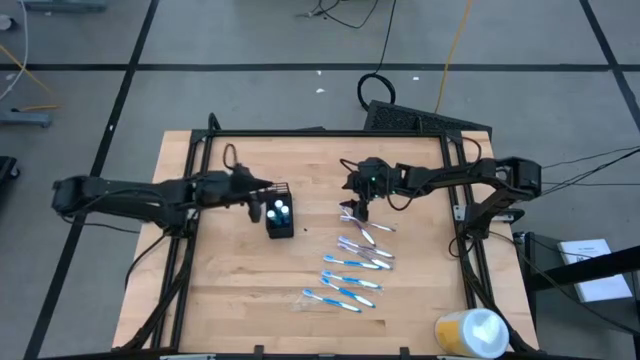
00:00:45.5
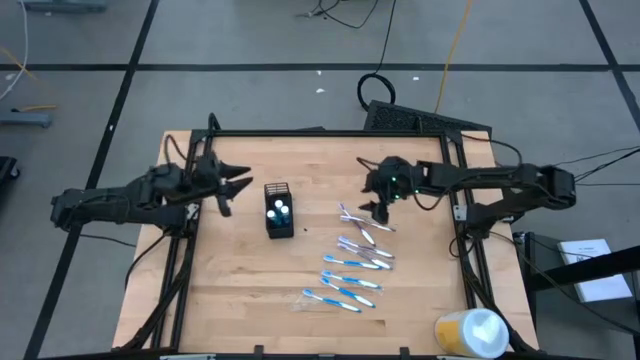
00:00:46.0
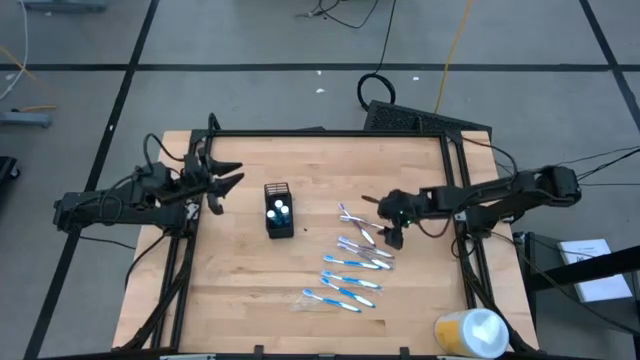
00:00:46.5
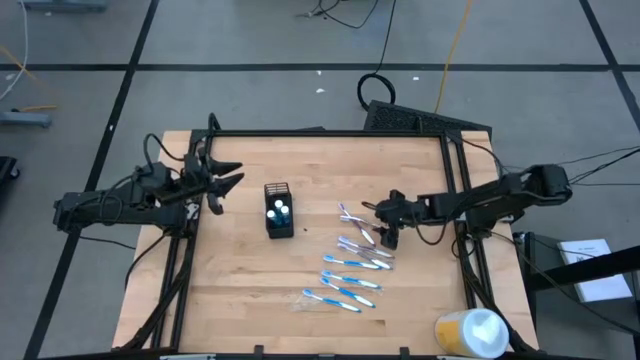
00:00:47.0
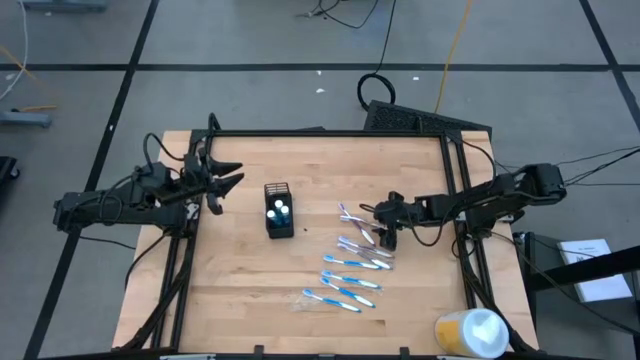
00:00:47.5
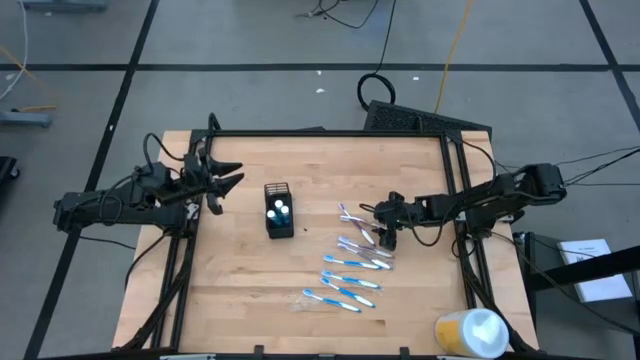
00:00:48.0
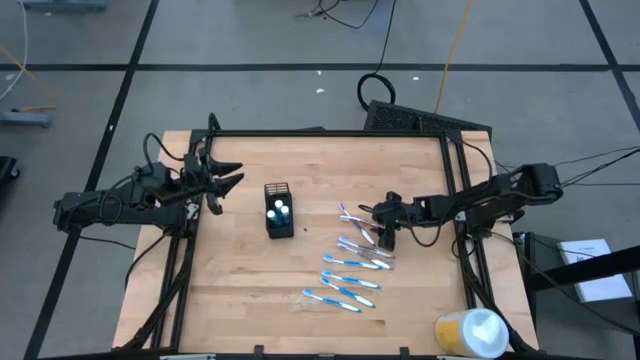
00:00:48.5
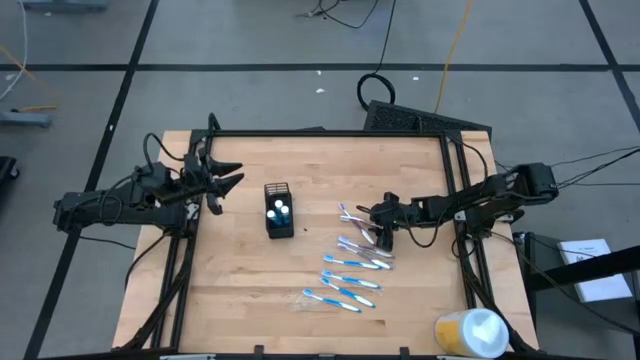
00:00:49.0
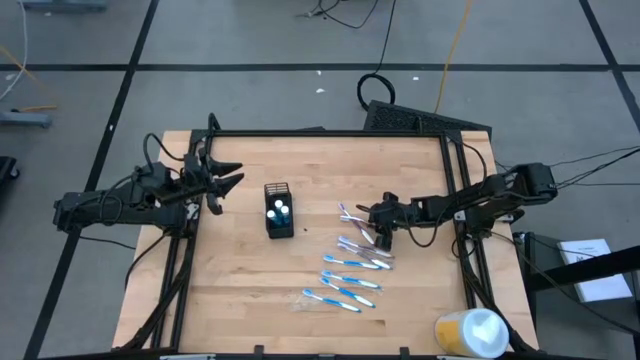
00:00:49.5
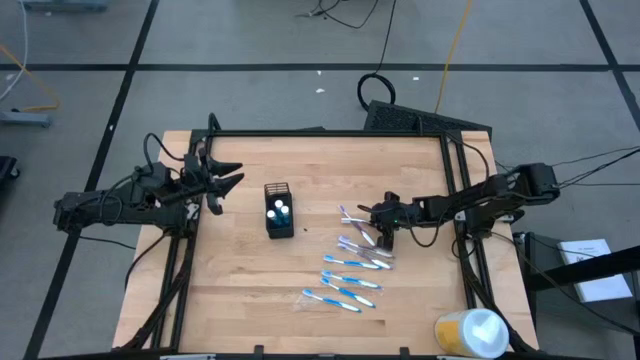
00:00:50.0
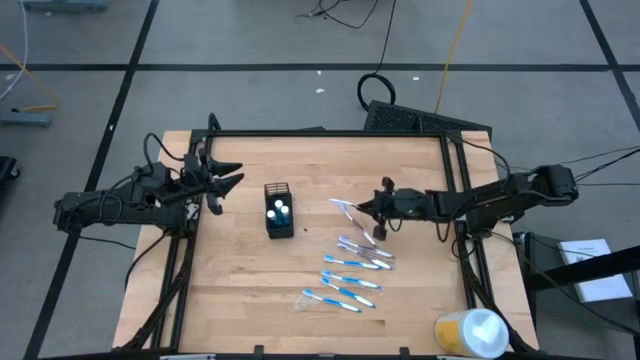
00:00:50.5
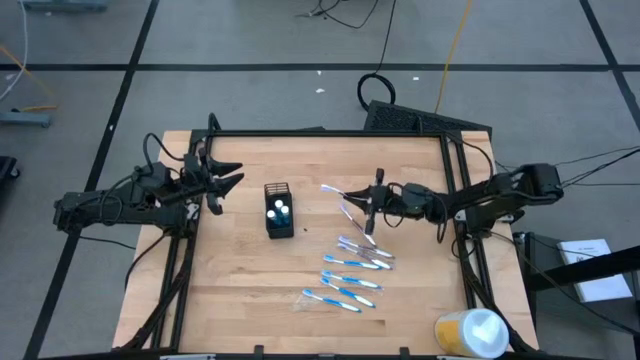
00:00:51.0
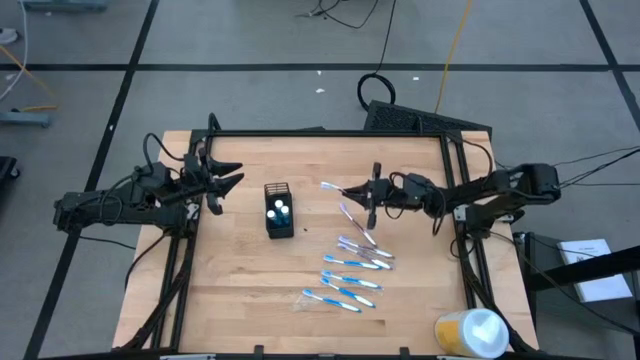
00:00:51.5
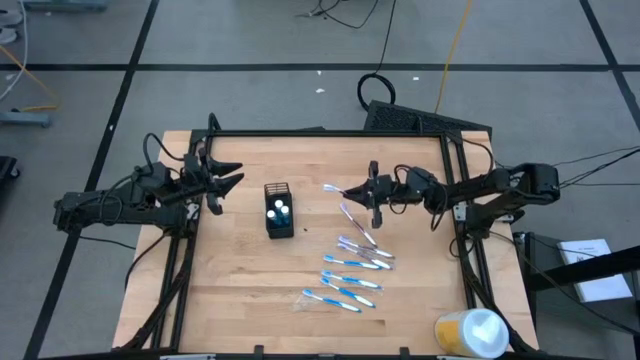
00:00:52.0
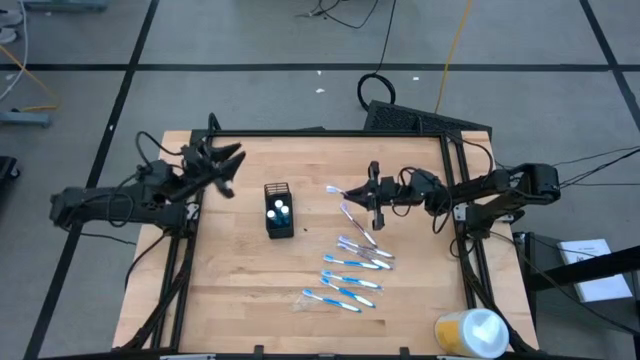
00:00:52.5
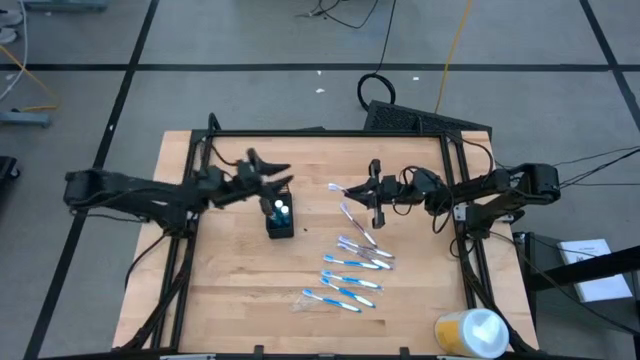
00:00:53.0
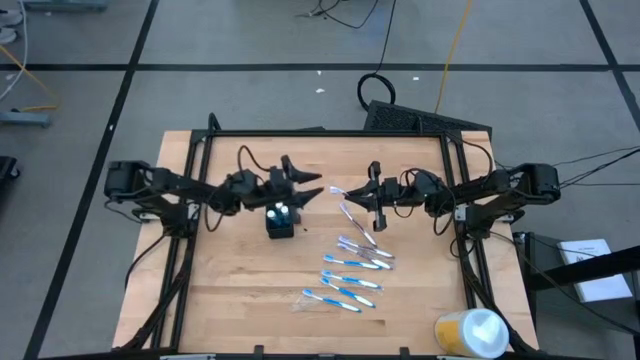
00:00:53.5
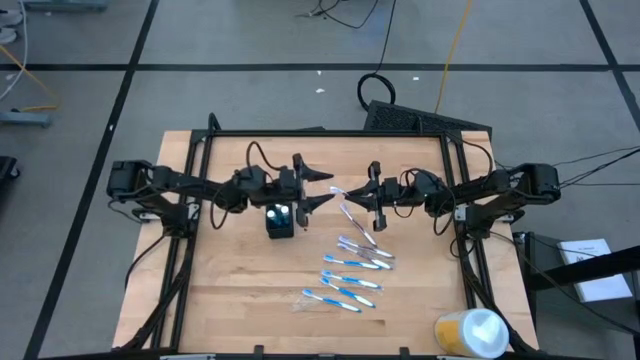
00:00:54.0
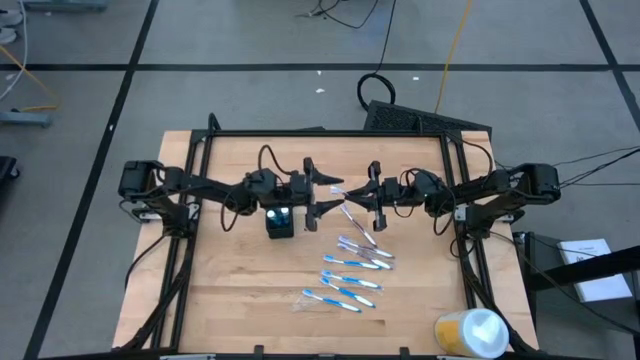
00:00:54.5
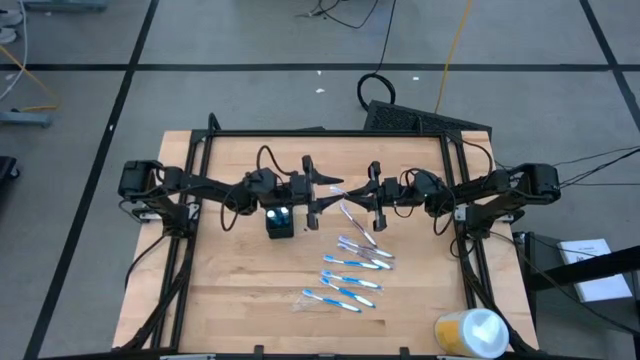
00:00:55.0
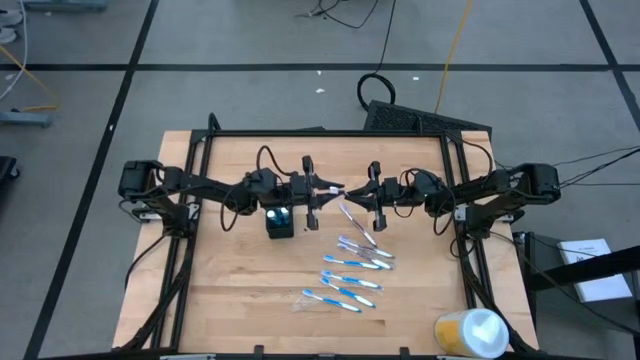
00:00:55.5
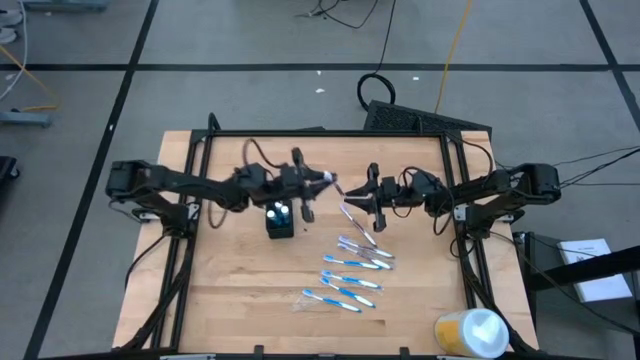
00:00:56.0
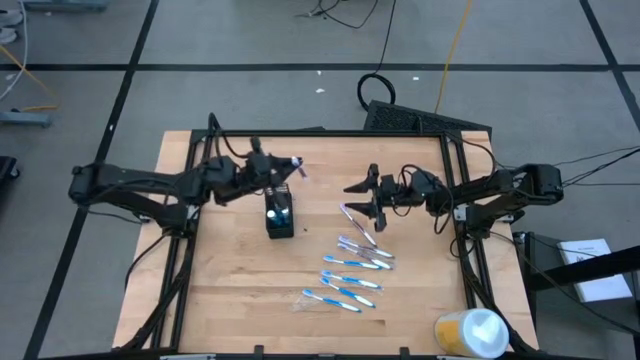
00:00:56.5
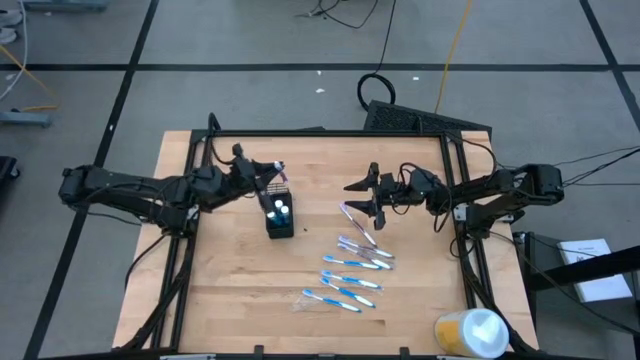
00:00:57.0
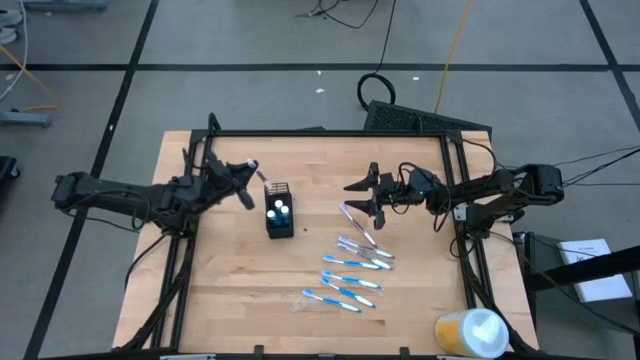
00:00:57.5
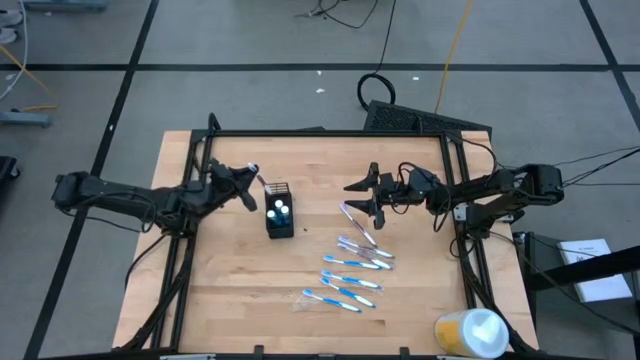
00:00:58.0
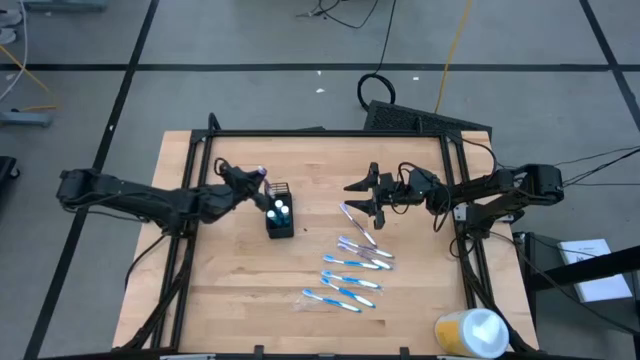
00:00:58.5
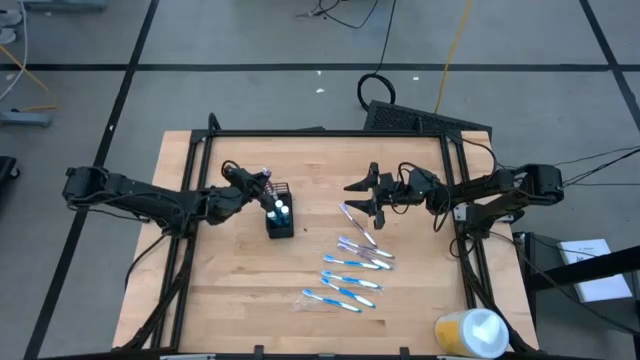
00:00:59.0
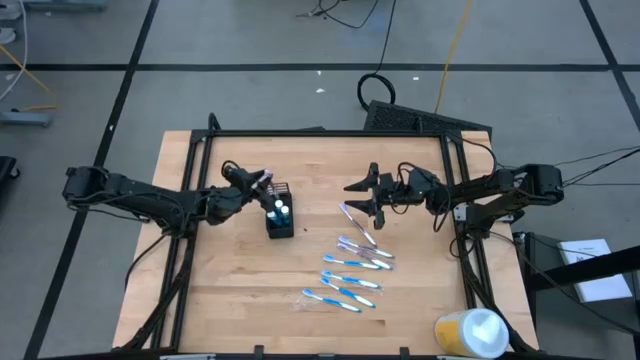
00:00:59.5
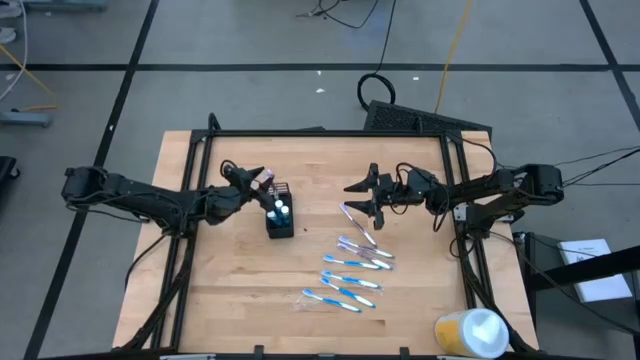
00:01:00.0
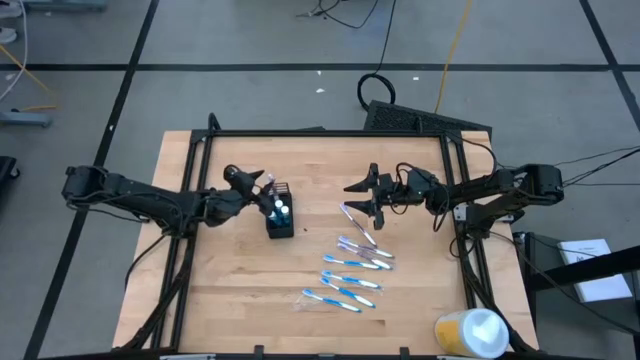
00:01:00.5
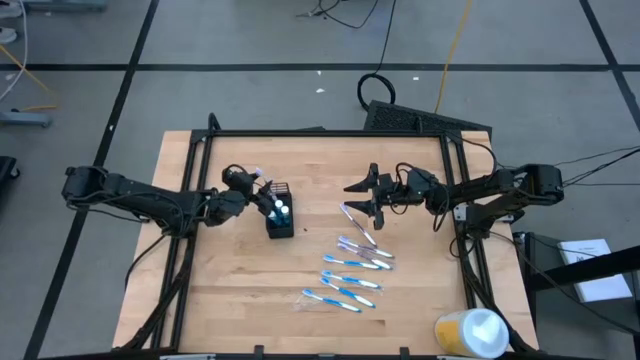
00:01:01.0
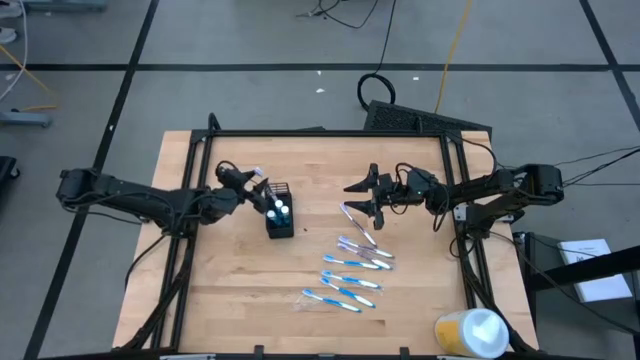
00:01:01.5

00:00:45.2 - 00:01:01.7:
Task: Pick & Place toothbrushing station
Put the purple toothbrush into the black organizer

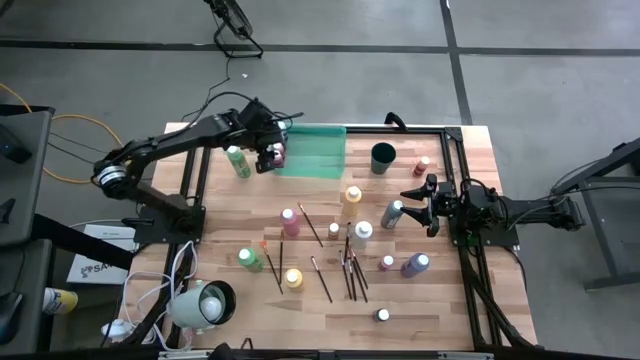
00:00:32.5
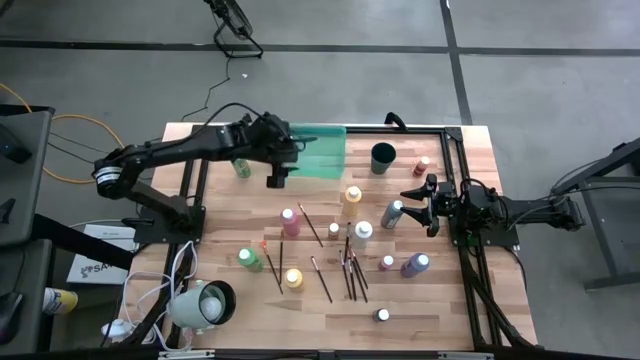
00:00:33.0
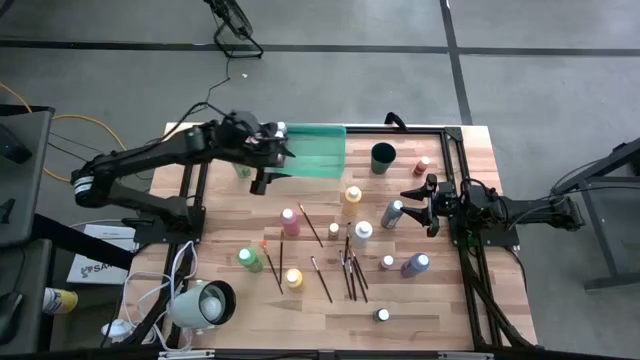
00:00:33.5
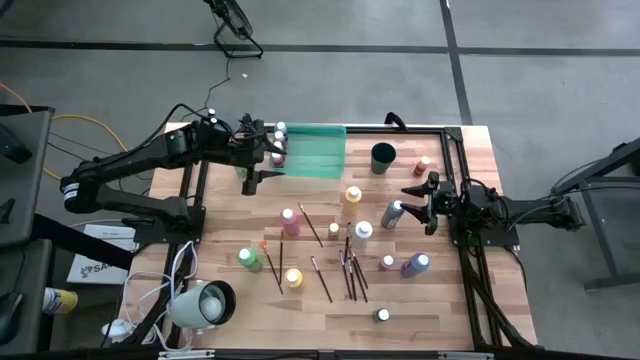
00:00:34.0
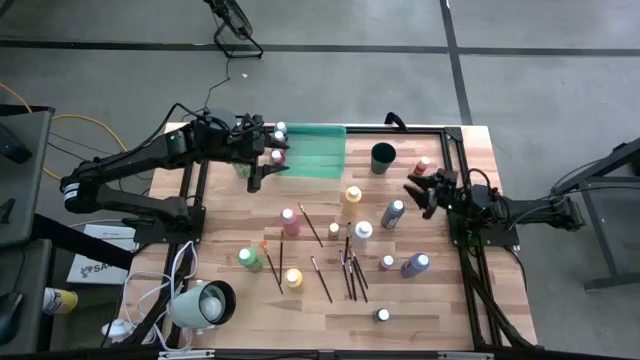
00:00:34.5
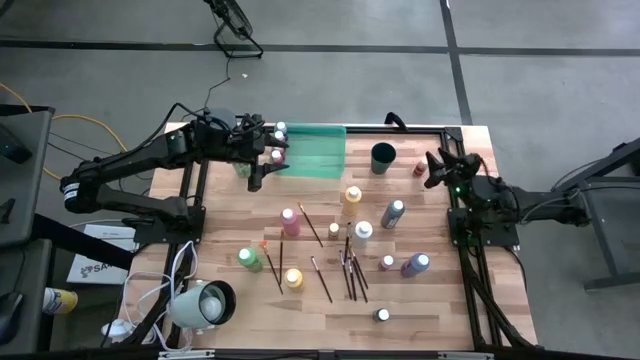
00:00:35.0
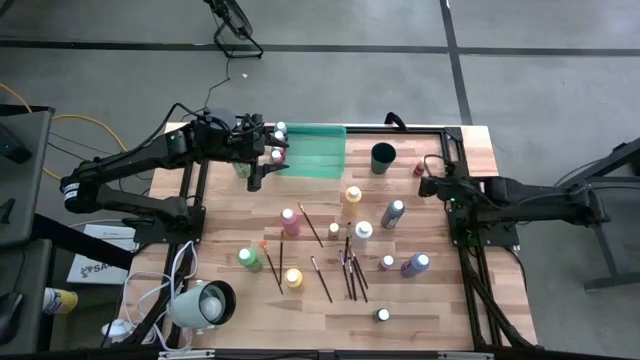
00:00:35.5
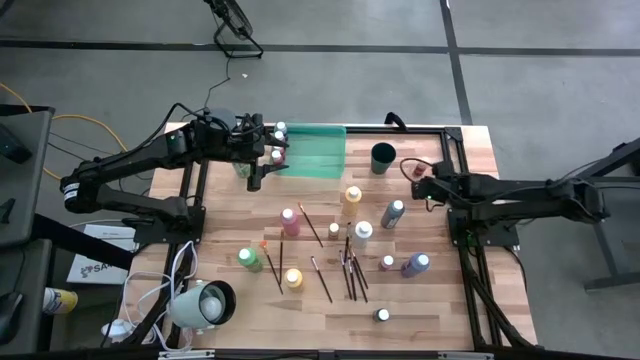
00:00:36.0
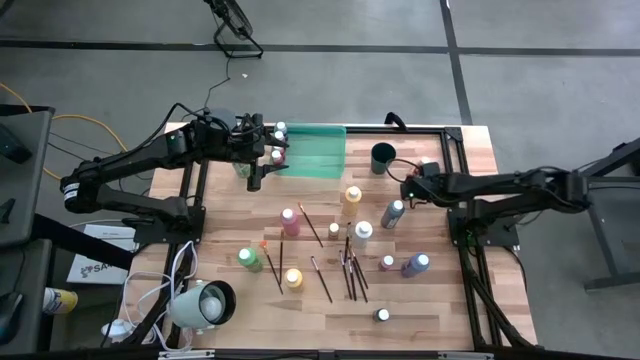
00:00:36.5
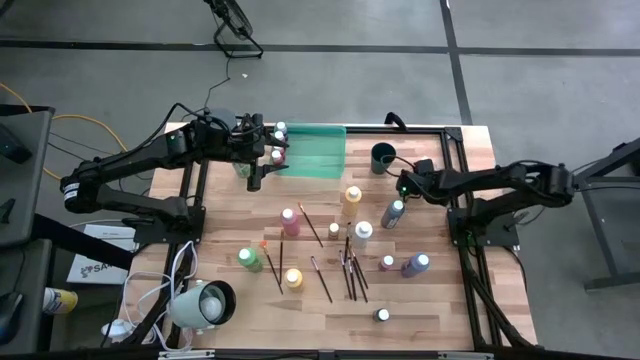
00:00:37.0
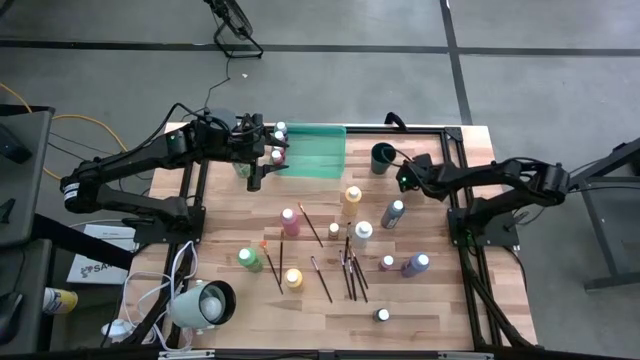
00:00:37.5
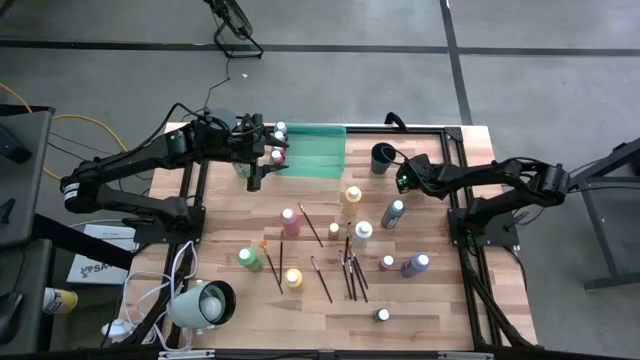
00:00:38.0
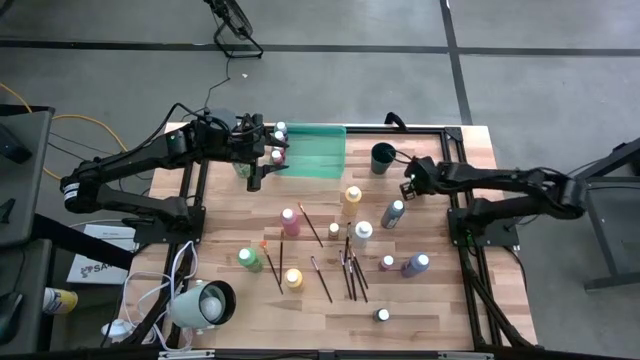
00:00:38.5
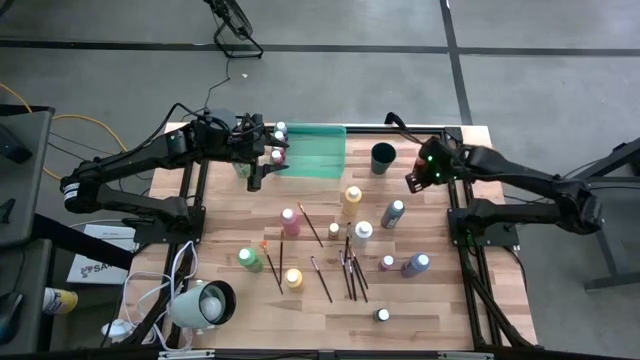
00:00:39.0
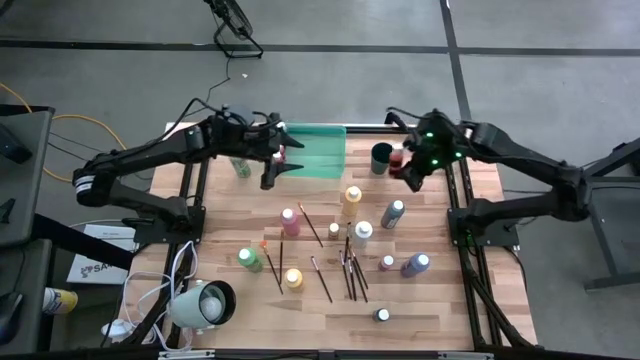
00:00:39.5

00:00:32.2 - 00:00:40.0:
Task: Pick & Place Paint Supplies
Put the orange paint bottle into the green bin
